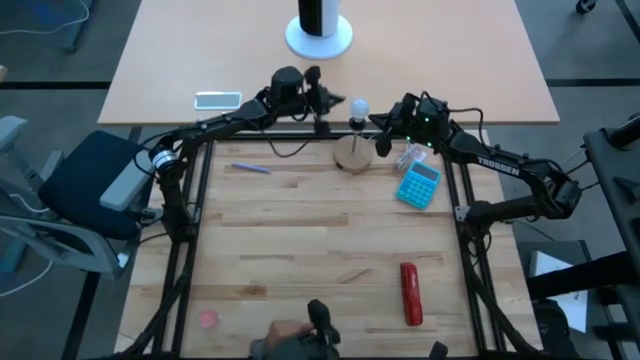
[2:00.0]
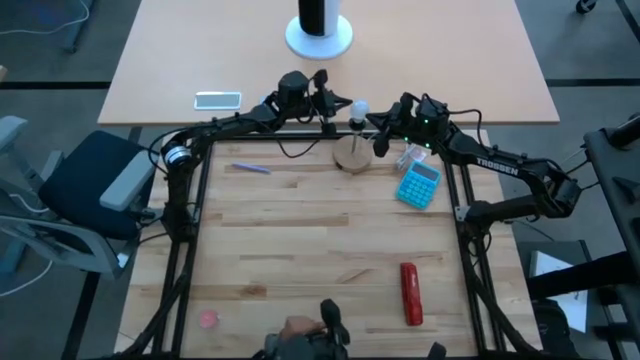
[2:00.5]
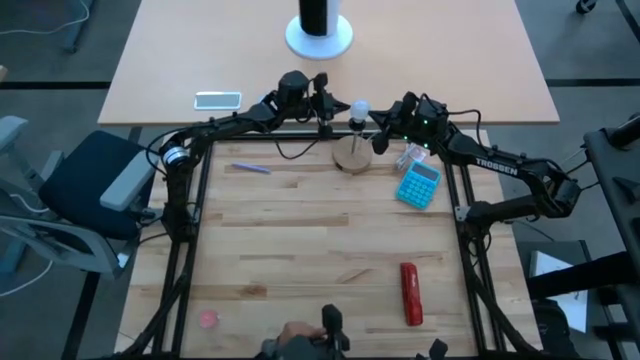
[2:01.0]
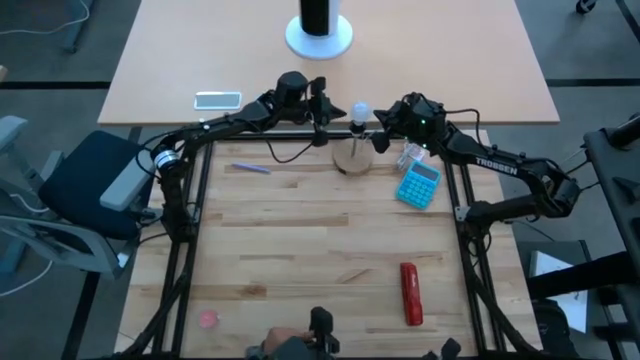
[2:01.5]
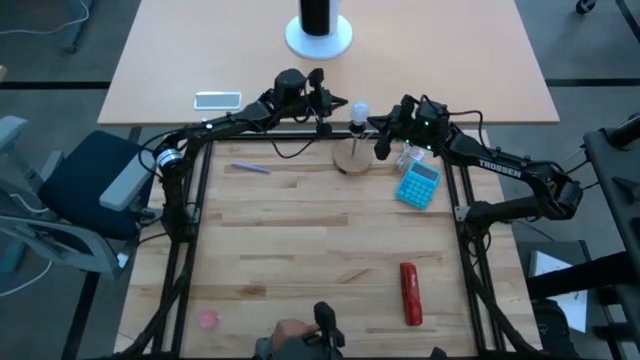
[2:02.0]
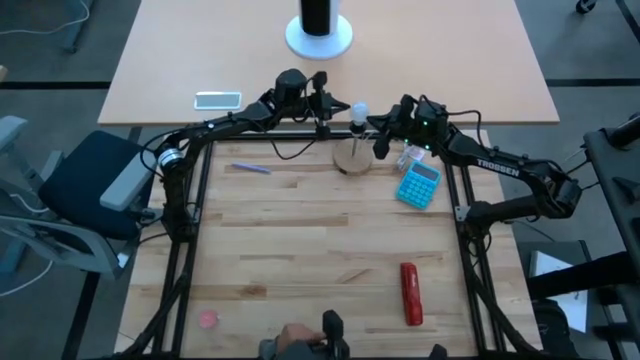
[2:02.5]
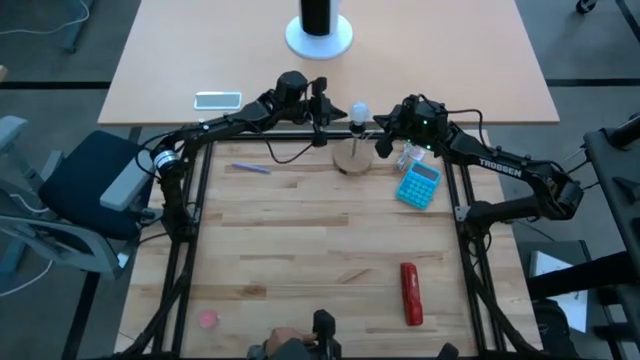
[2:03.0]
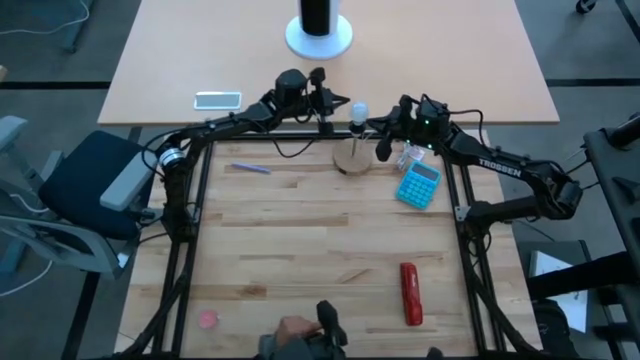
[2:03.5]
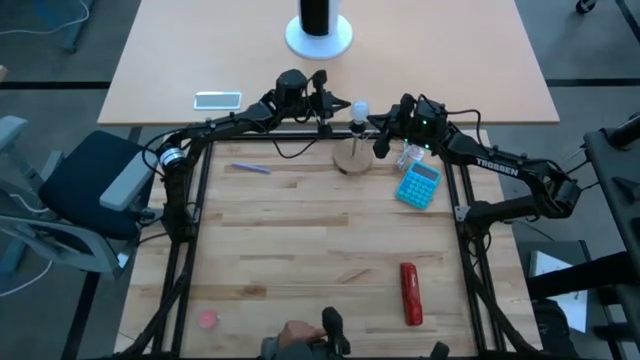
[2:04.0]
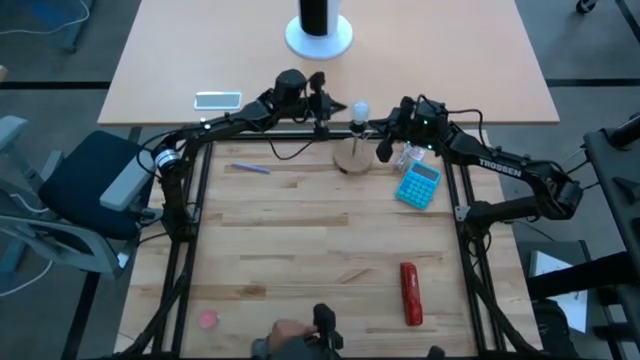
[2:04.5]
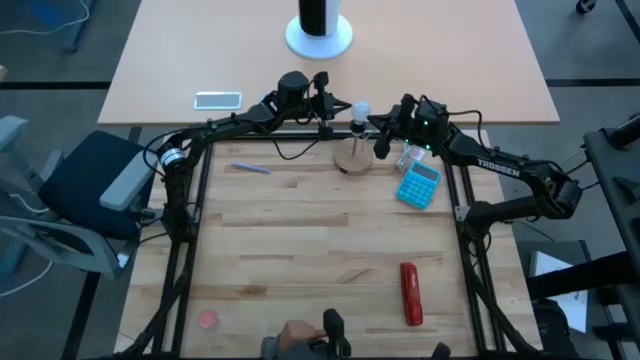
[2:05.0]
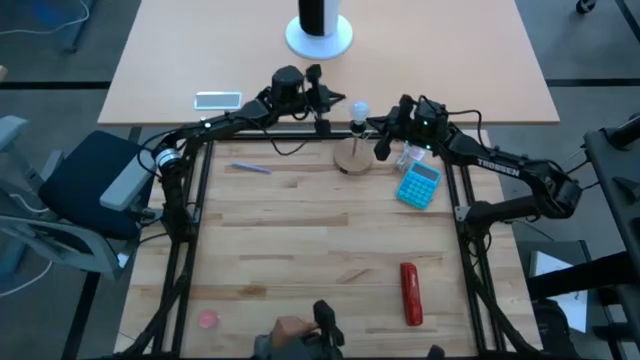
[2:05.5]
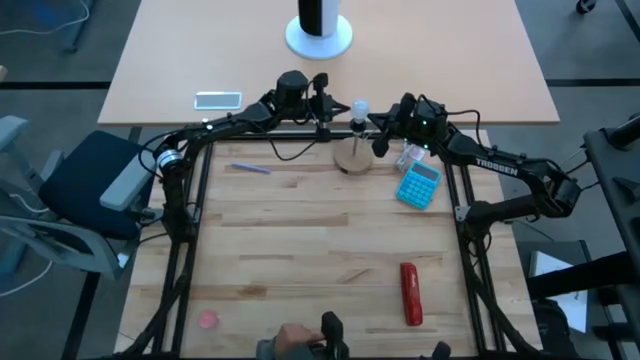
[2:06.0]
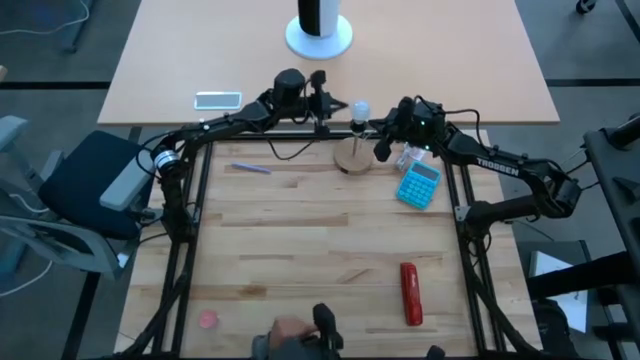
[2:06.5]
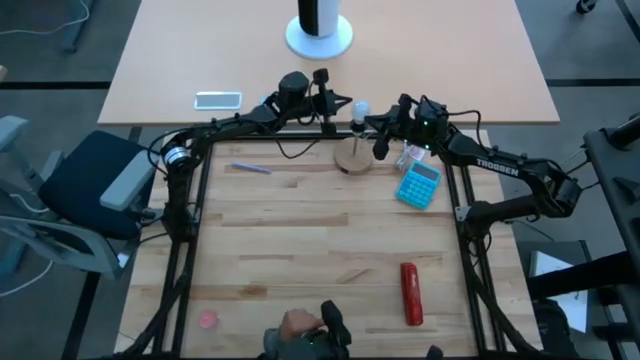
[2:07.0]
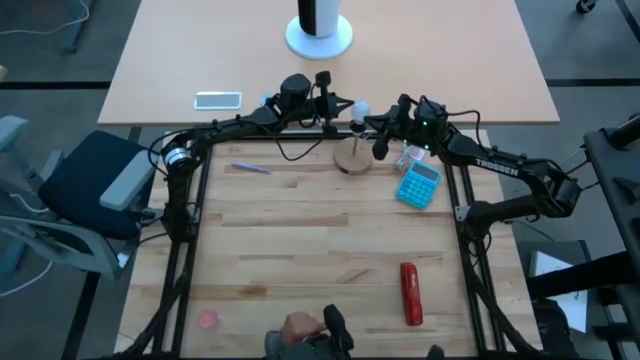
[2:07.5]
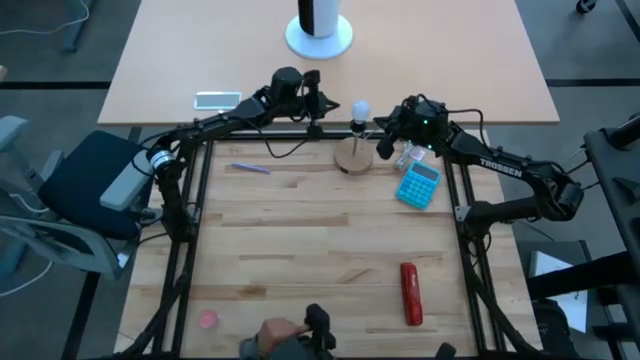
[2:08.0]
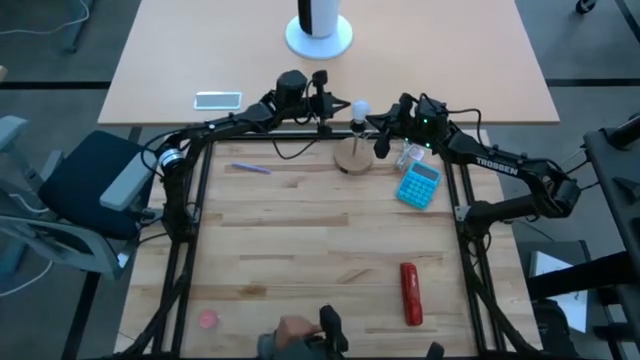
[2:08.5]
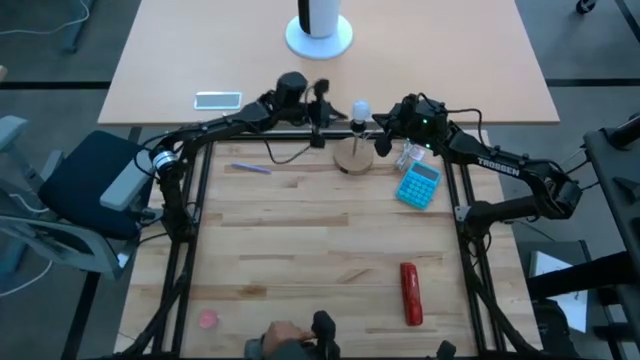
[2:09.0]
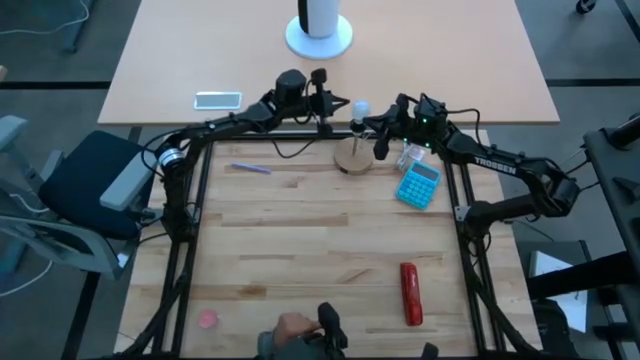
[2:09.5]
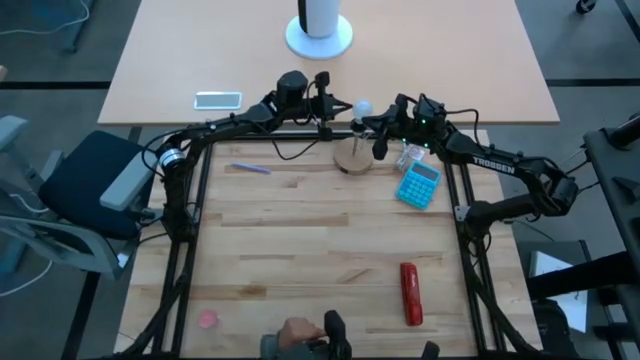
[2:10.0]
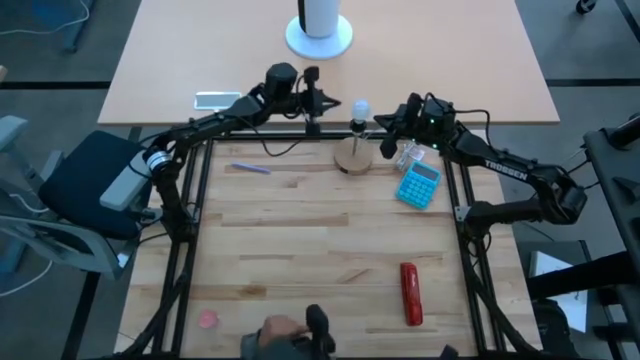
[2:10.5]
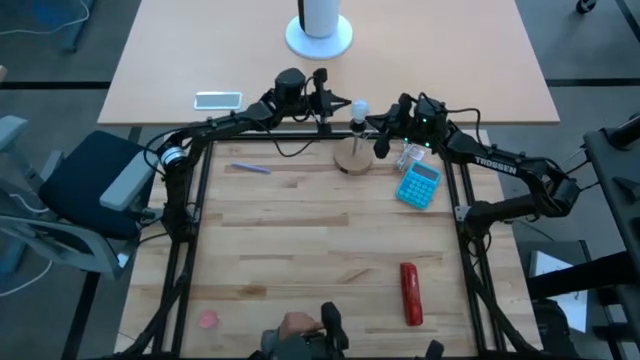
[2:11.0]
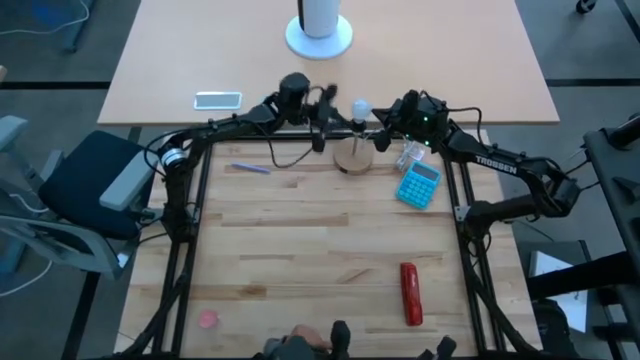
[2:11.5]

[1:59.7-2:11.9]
Task: Screw lightbulb
Remove the lightbulb from the lamp

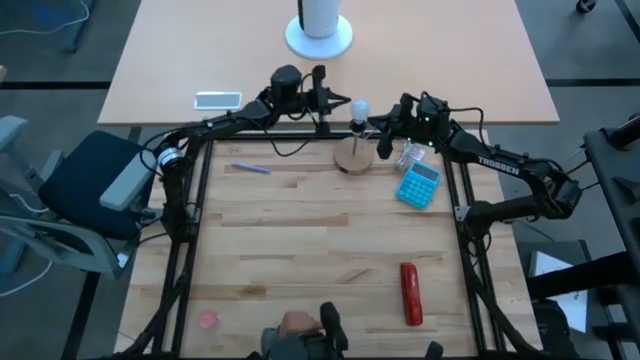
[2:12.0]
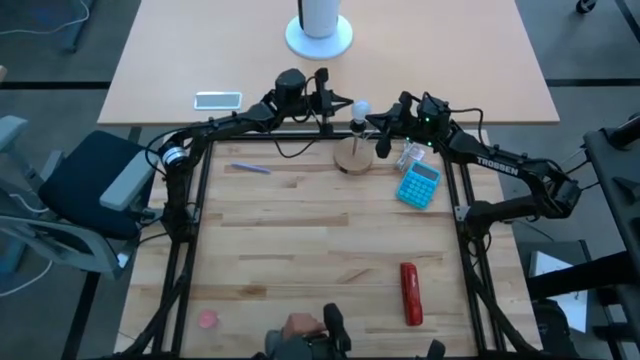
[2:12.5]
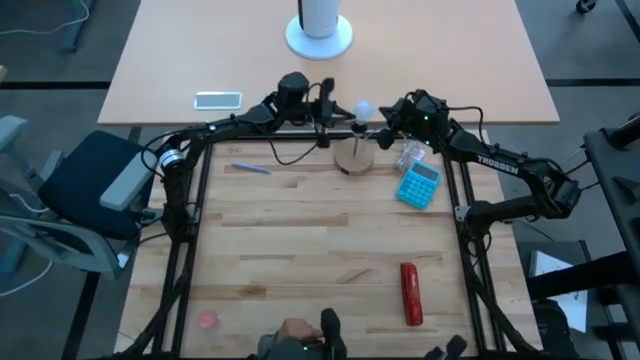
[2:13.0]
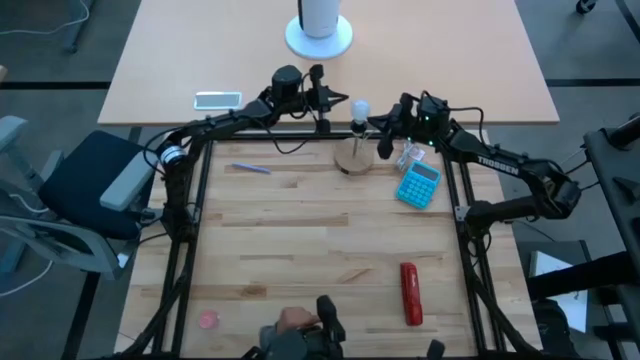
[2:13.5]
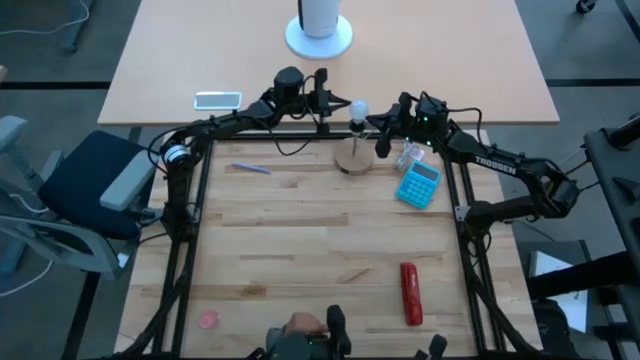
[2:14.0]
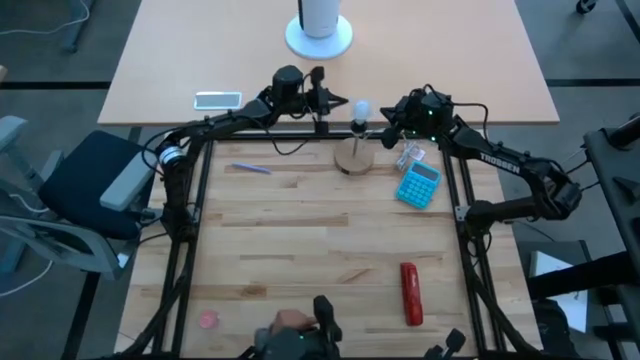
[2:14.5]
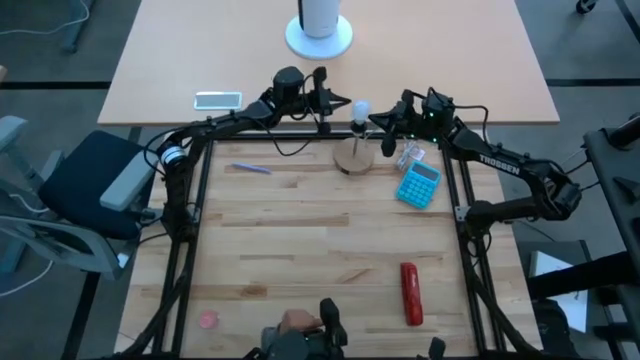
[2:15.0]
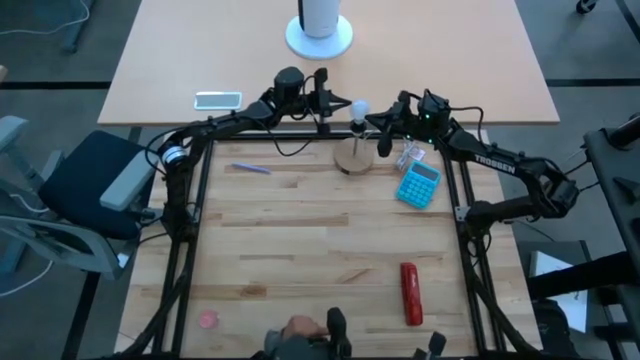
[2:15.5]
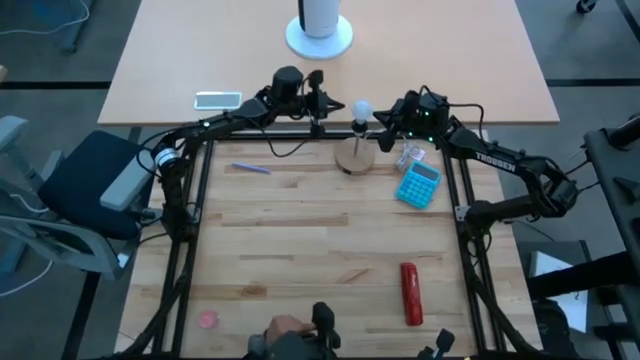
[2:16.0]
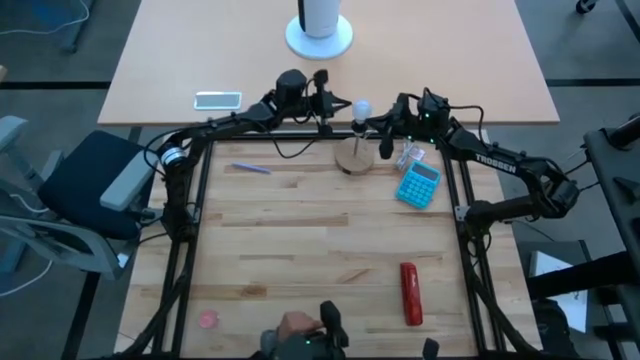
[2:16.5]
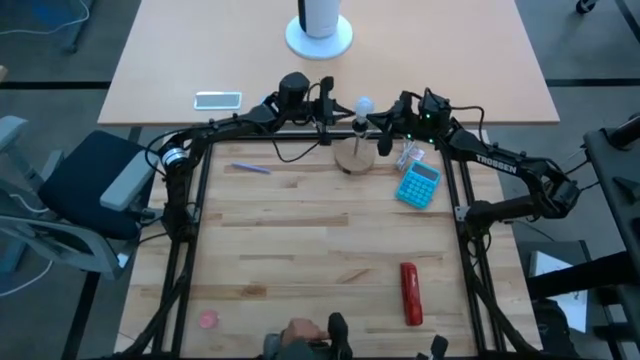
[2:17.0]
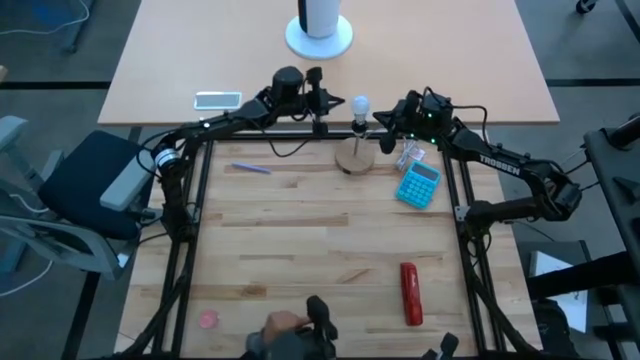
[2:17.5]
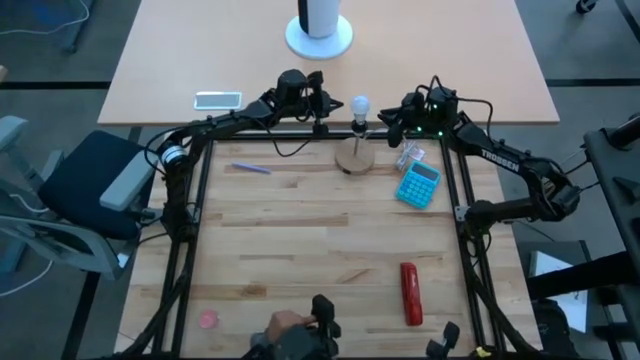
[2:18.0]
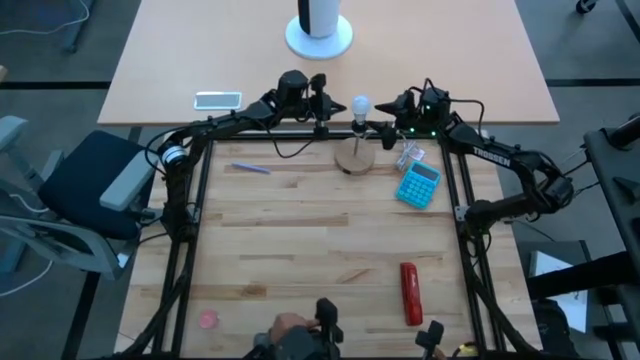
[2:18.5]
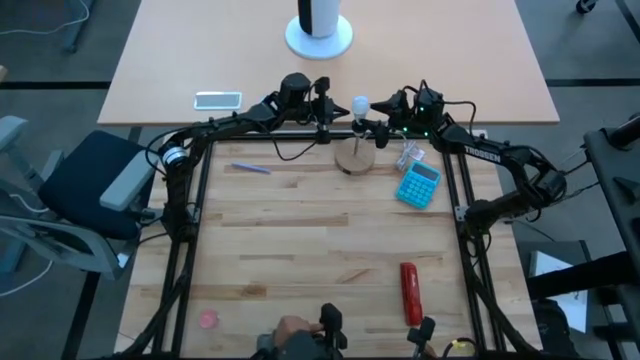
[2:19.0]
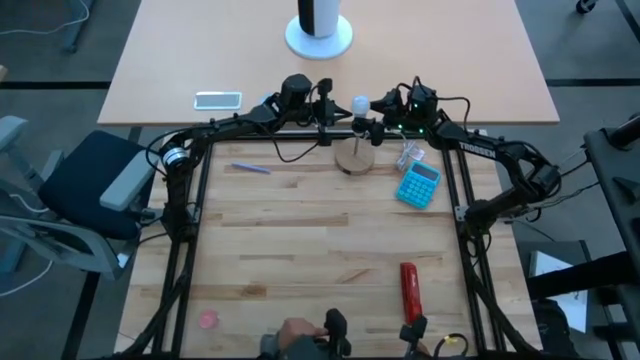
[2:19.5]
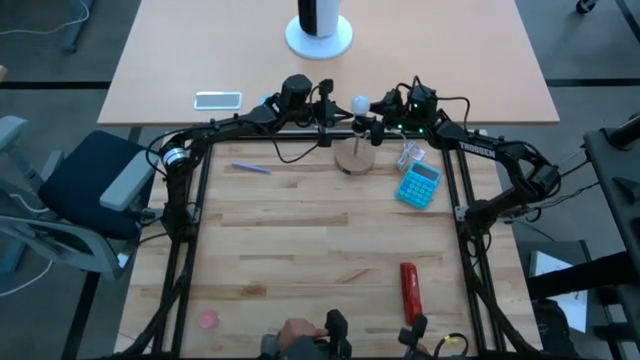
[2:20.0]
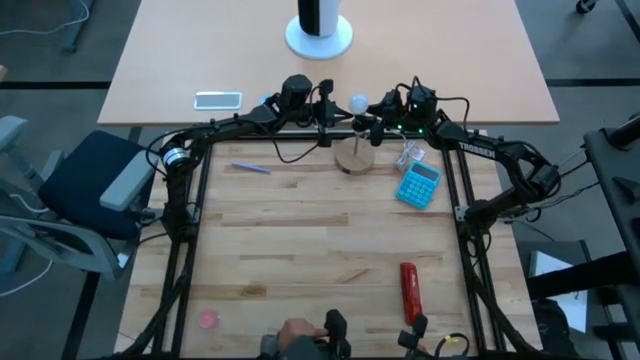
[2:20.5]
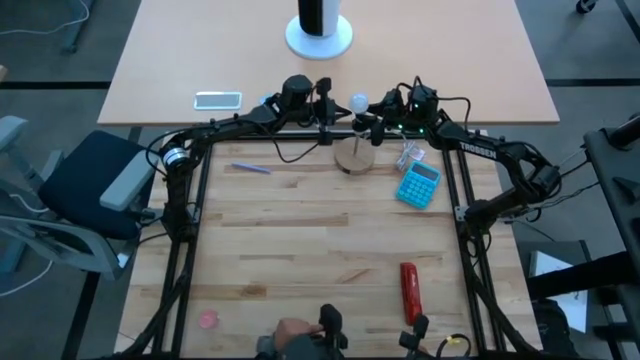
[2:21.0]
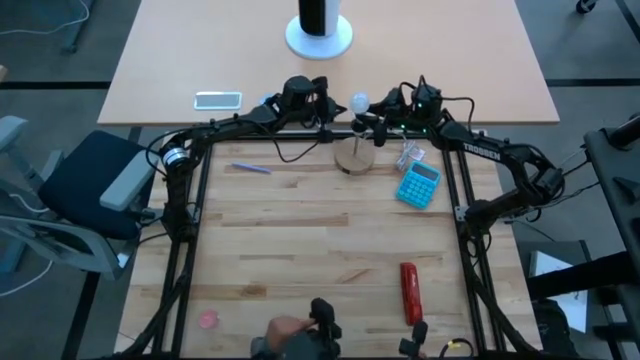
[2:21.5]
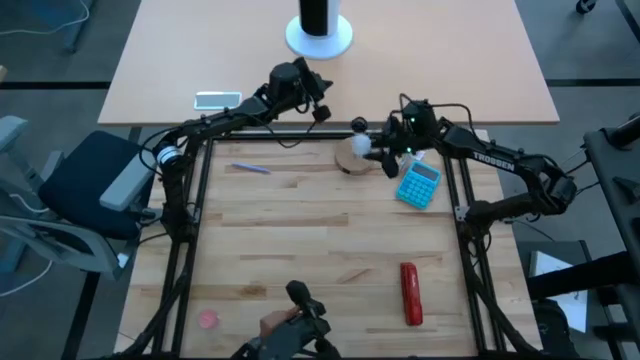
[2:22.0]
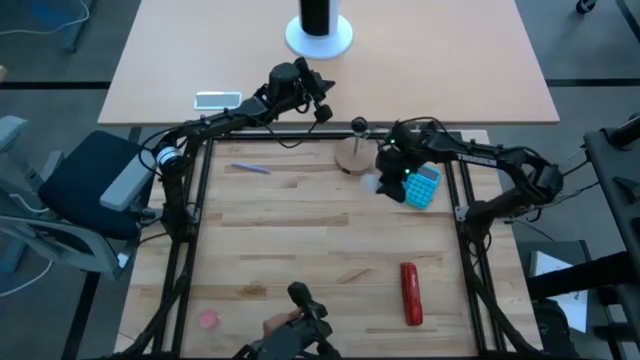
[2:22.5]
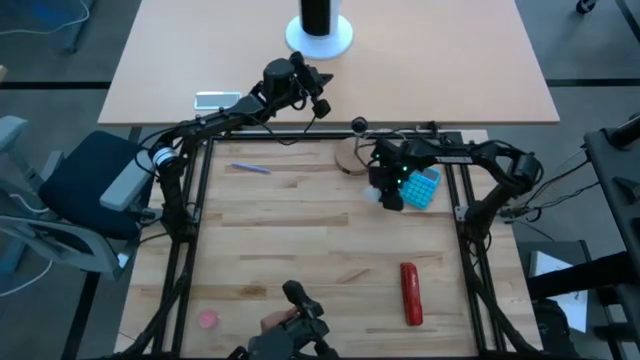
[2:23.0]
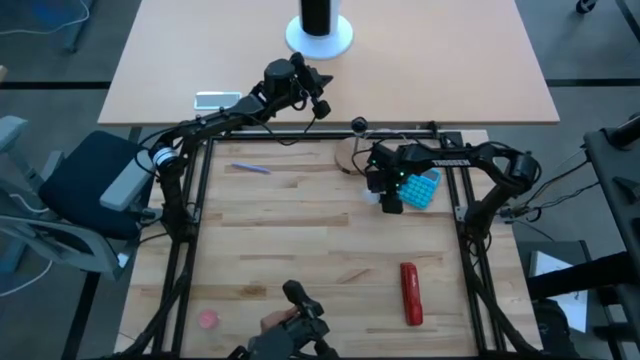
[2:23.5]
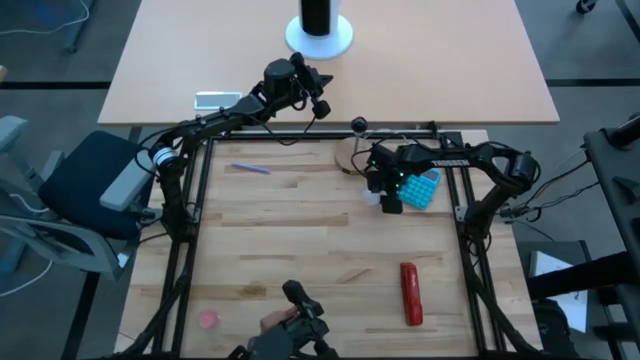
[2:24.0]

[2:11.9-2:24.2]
Remove the lightbulb from the lamp
